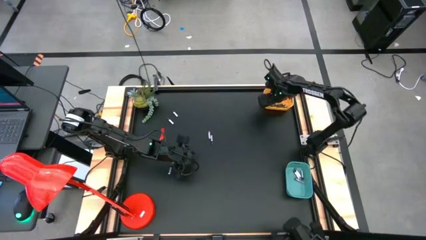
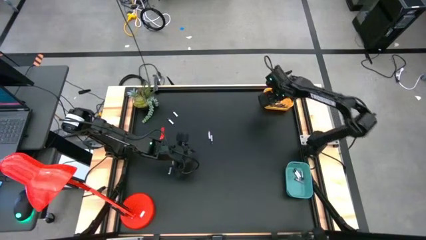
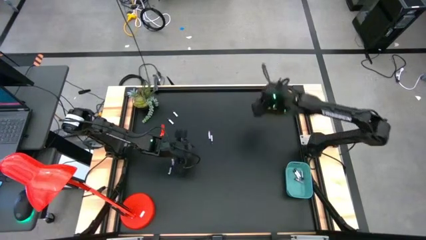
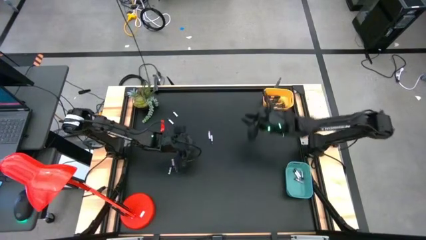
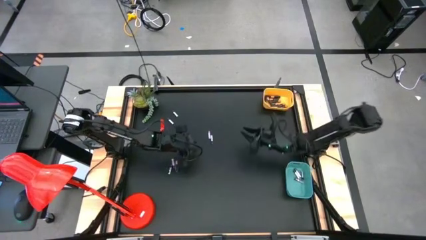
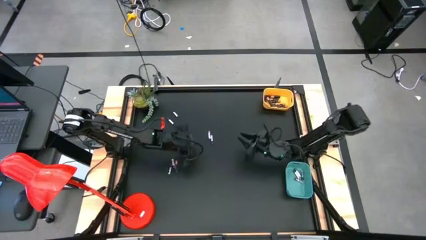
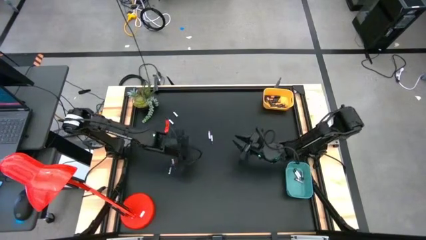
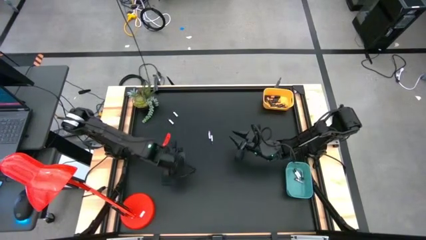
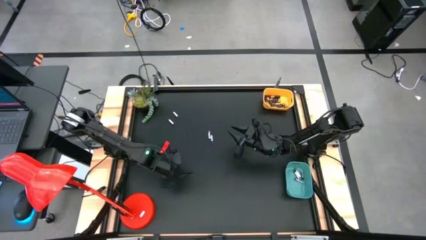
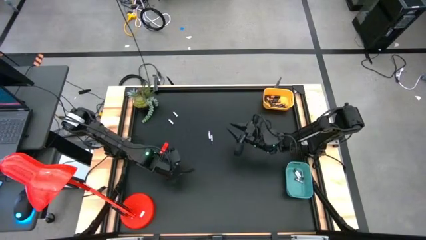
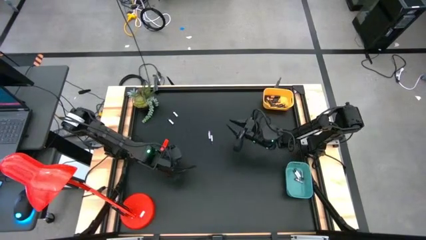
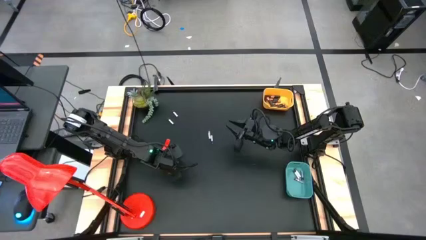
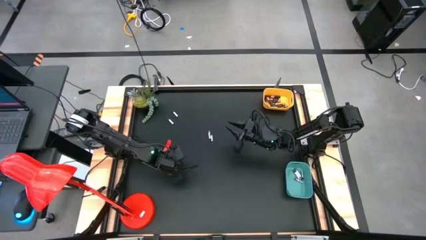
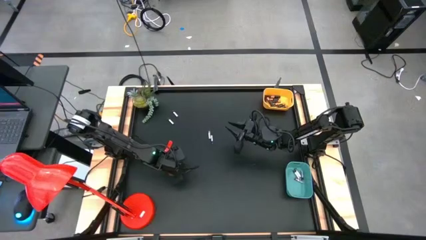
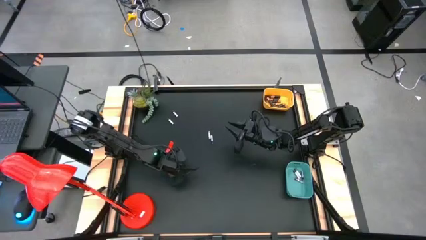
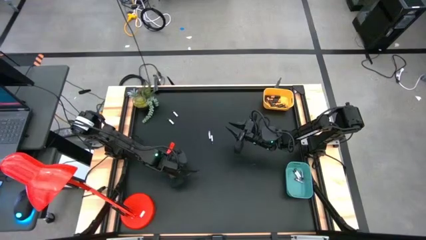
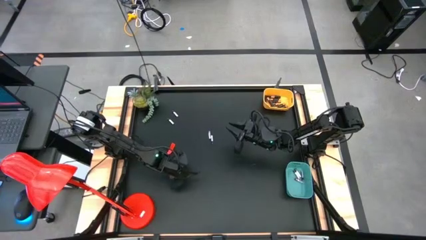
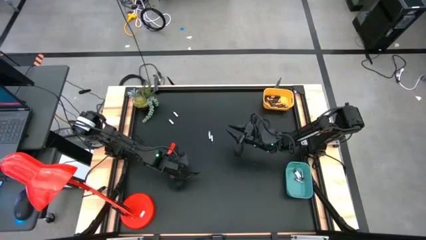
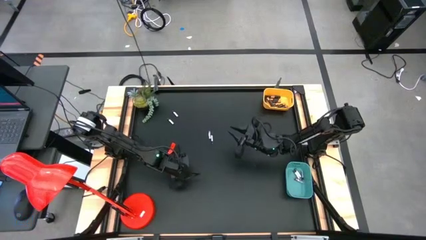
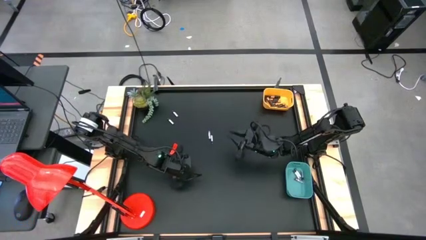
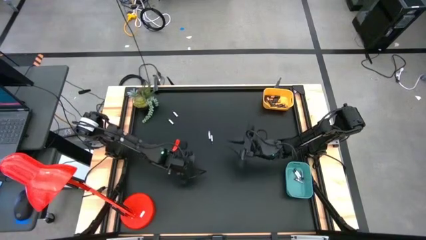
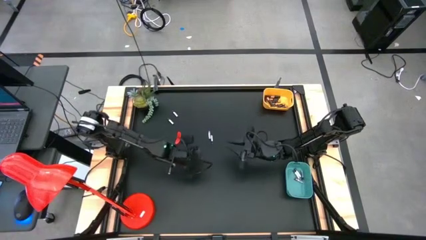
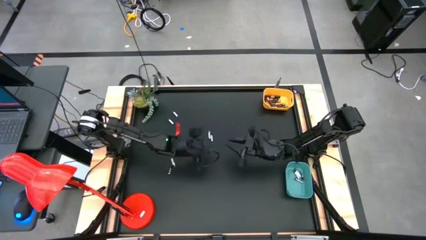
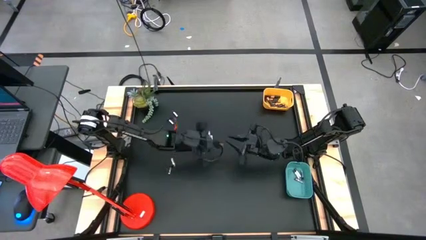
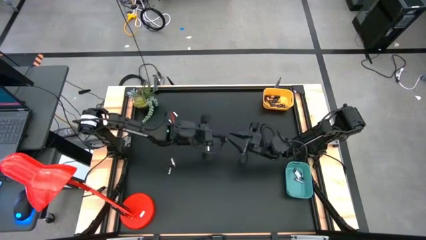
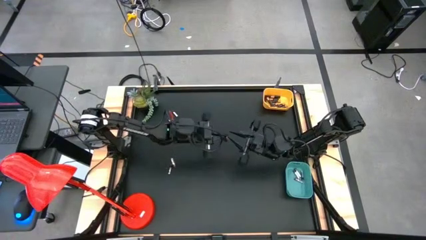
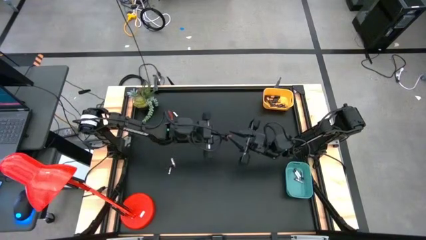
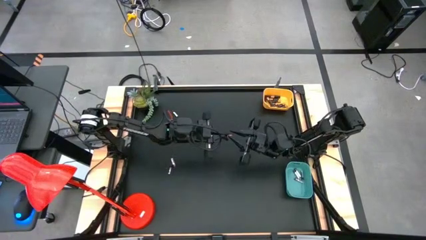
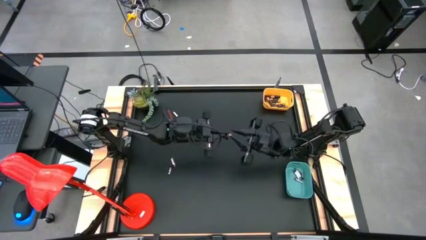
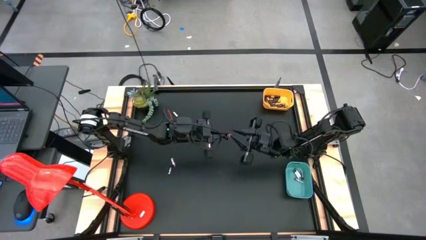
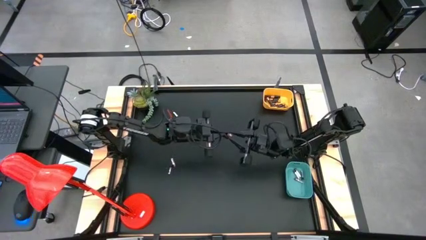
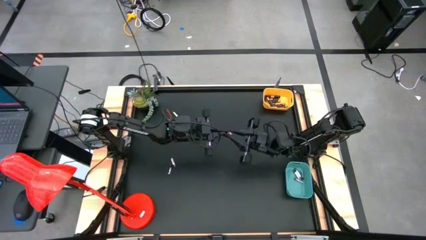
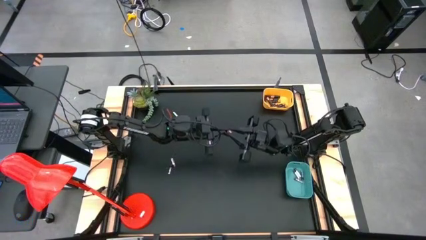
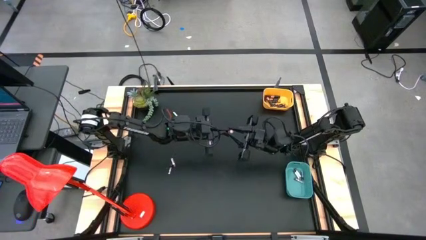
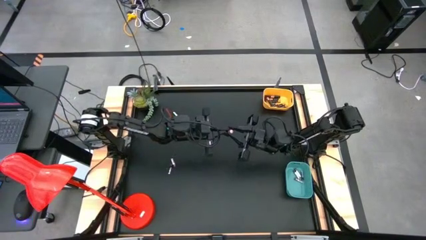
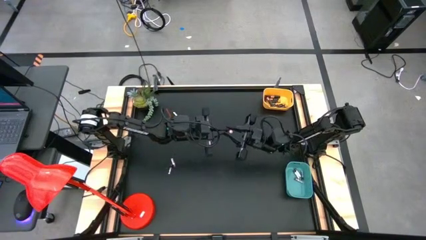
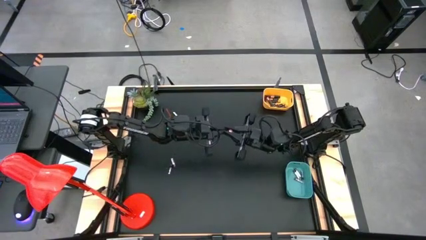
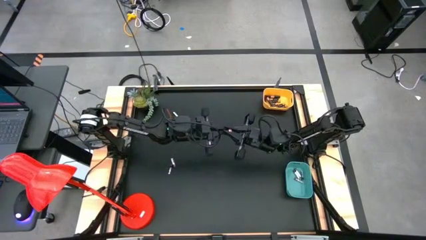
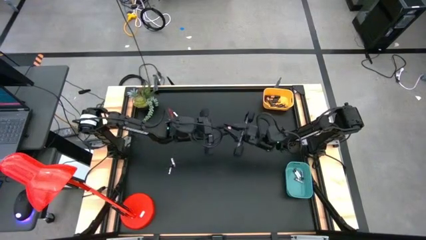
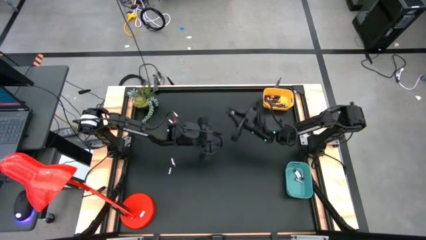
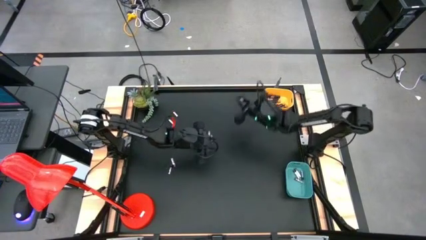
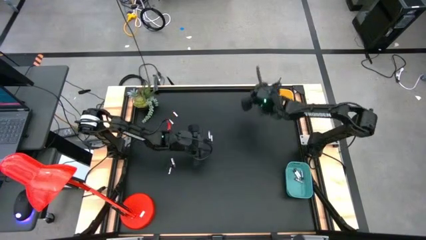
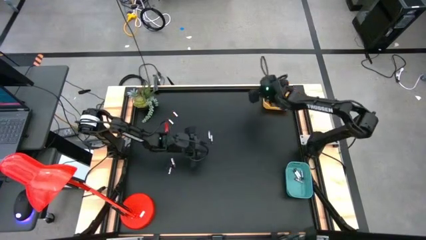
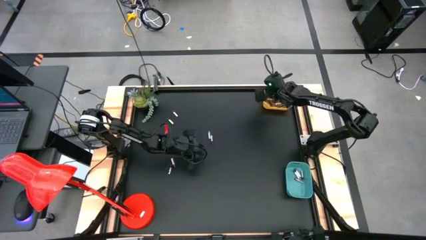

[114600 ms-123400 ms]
Task: Sort batteries
Put the black battery into the yellow bin

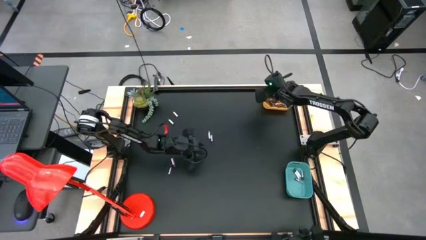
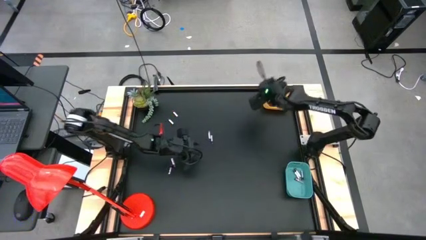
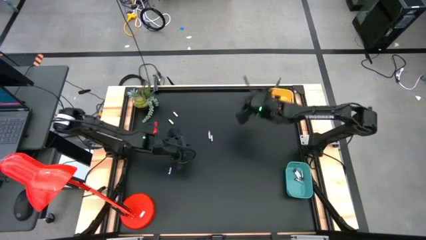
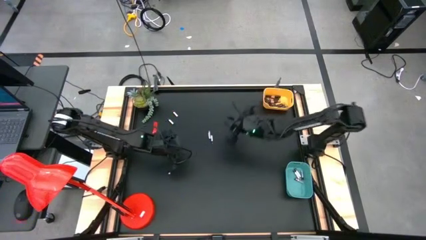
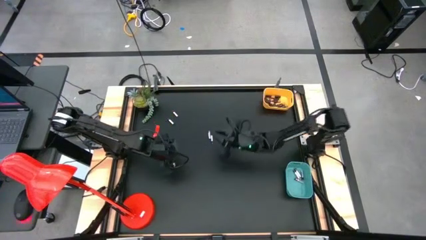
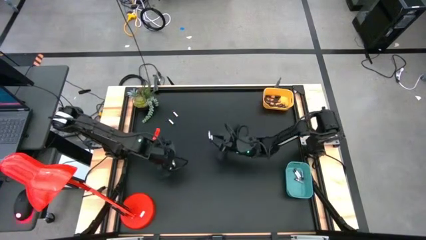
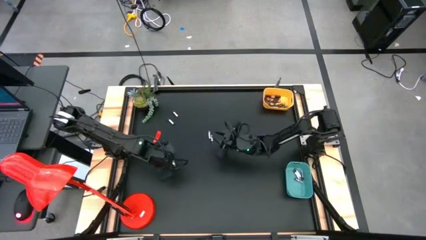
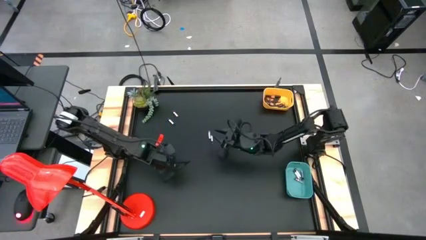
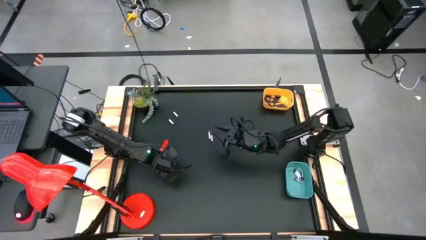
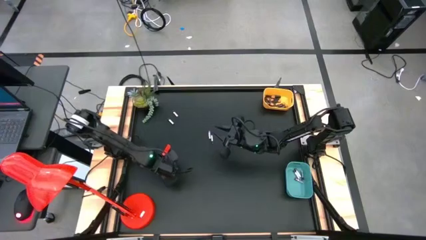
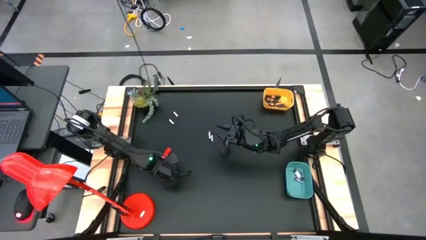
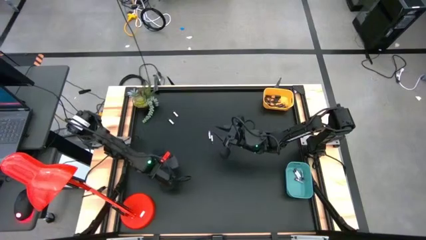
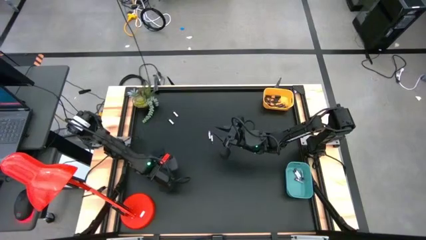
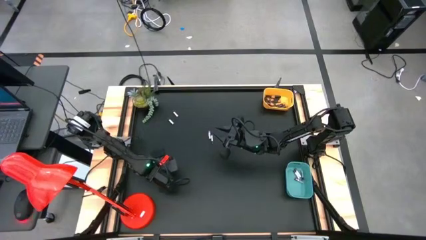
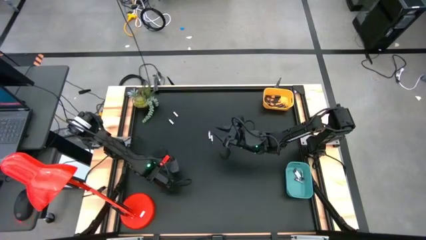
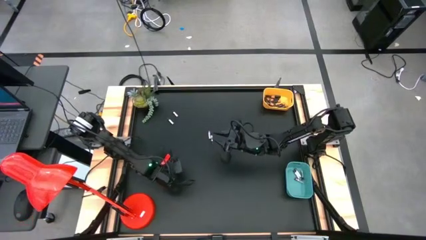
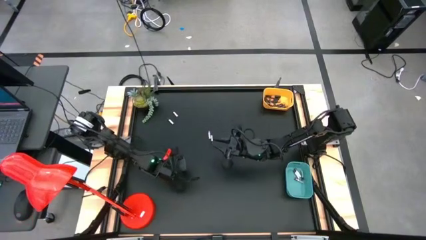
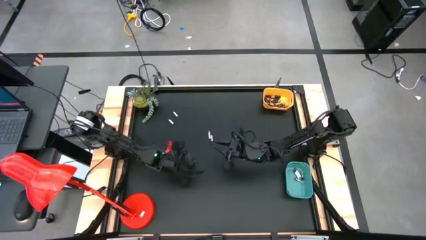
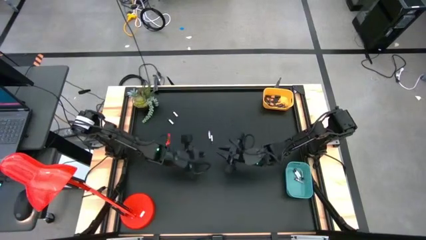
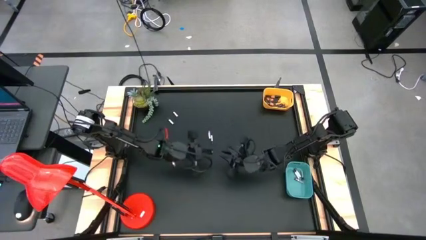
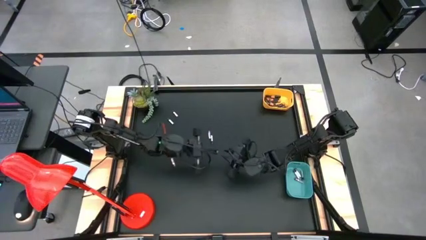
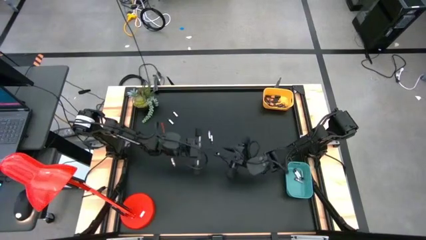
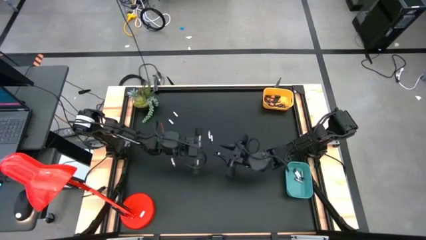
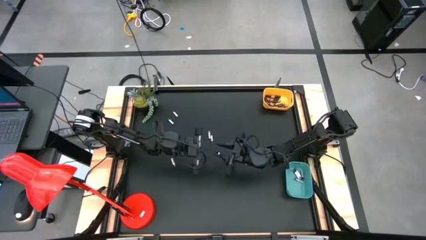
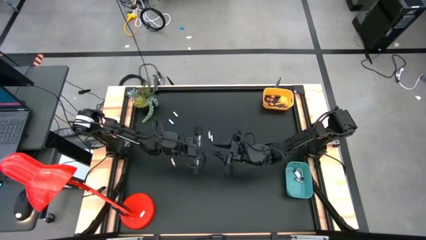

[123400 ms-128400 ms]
Put the silver battery into the green bin

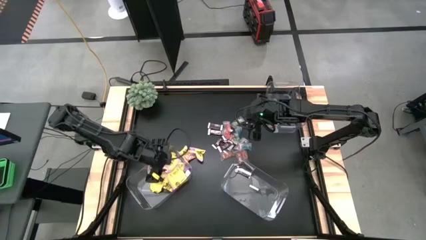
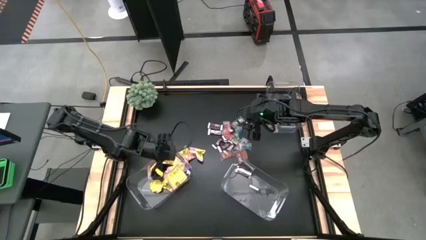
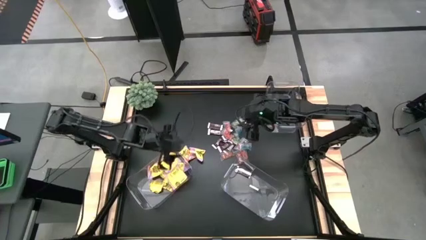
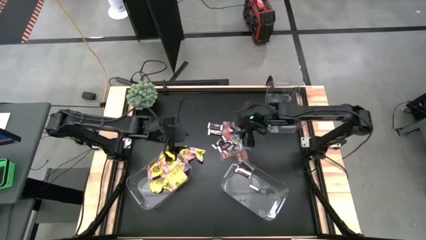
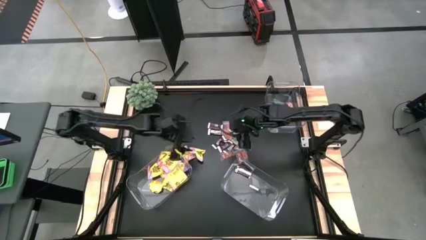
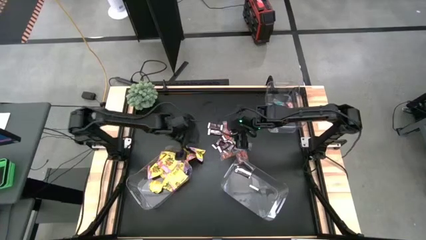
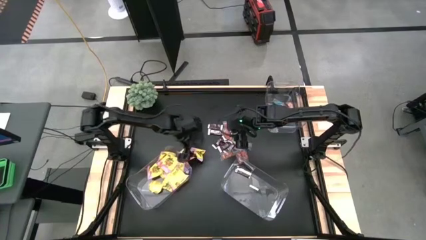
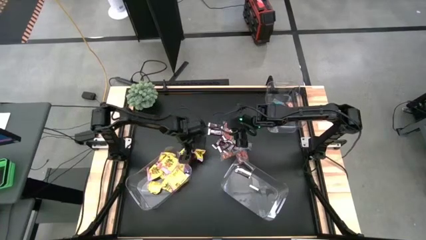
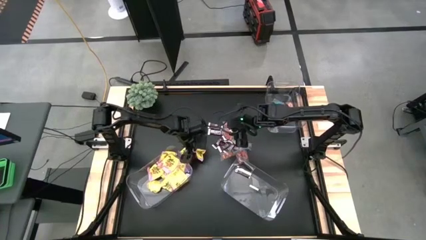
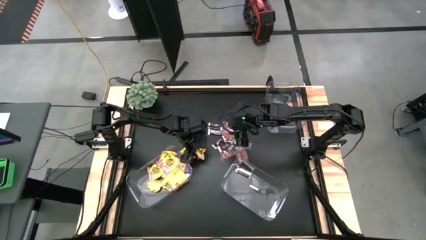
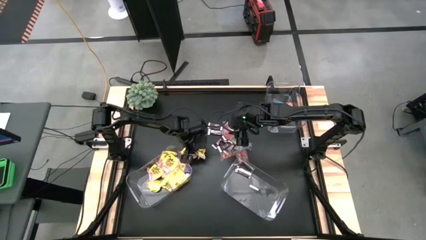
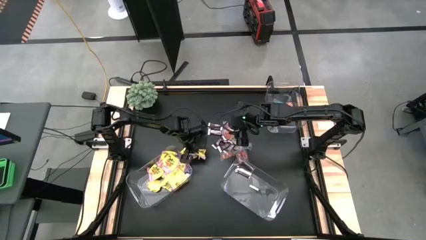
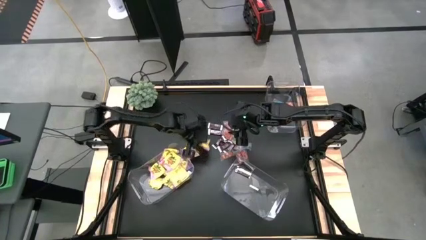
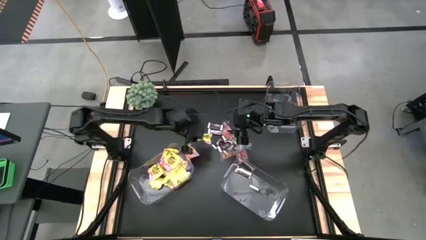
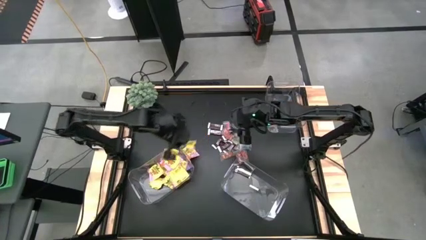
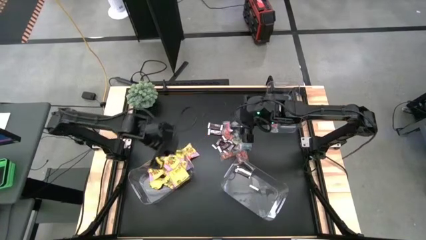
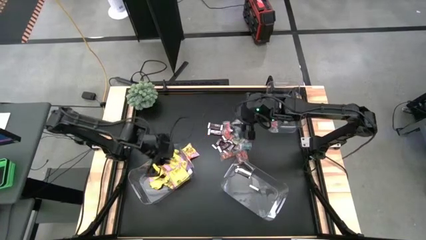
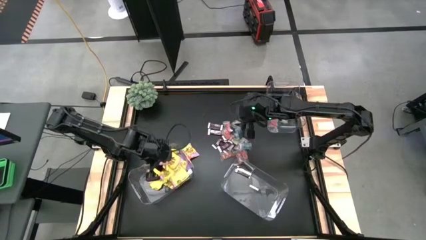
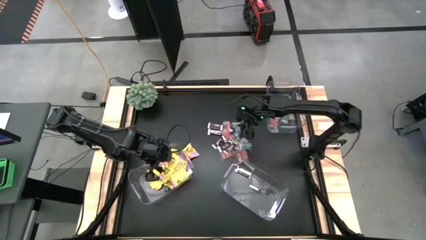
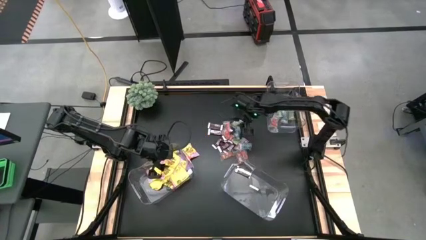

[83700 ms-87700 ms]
Task: Sort candy
Put the yellow candy in the bottom left transparent container
